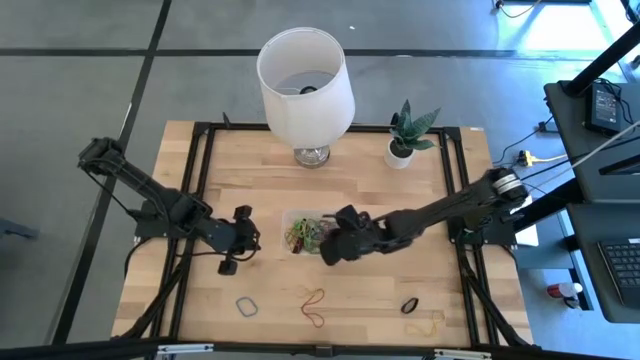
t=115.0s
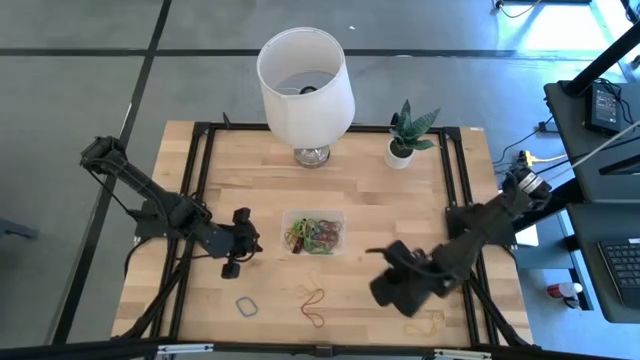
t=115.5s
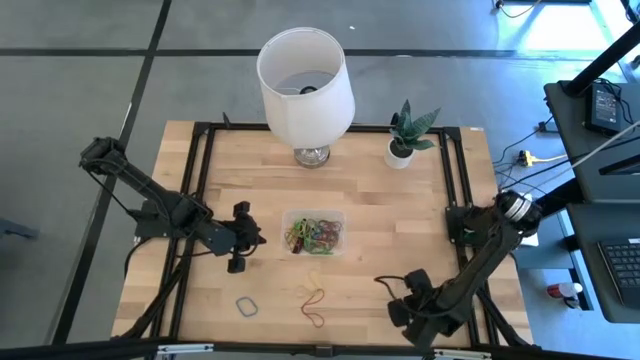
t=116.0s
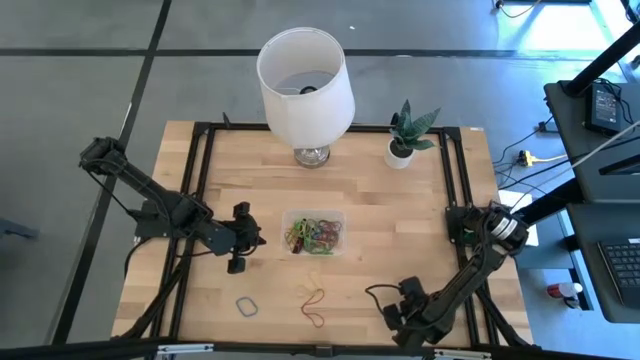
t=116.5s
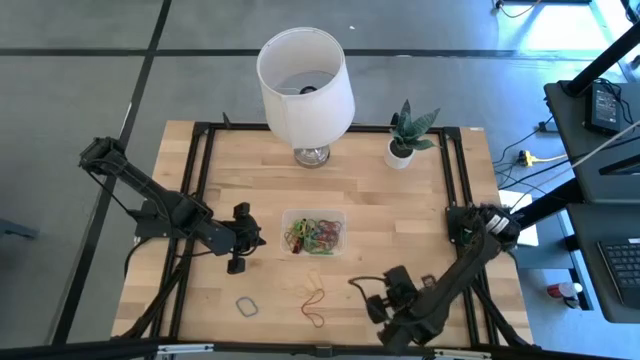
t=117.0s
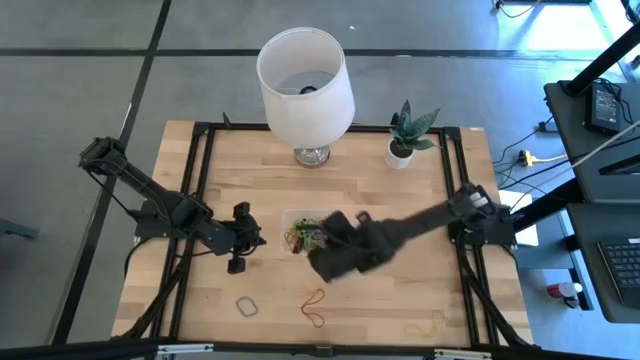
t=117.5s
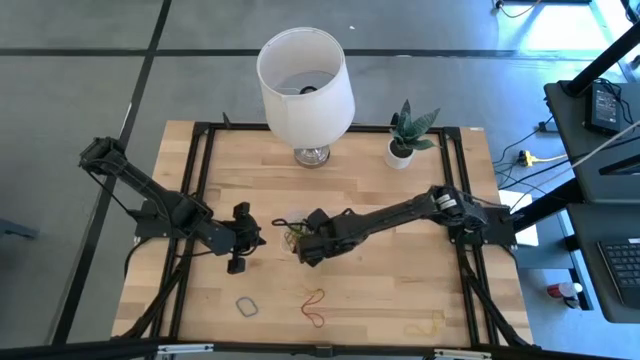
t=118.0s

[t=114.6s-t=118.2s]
Task: Pick and place rubber bands into bin
Put the black rubber band into the transparent bin

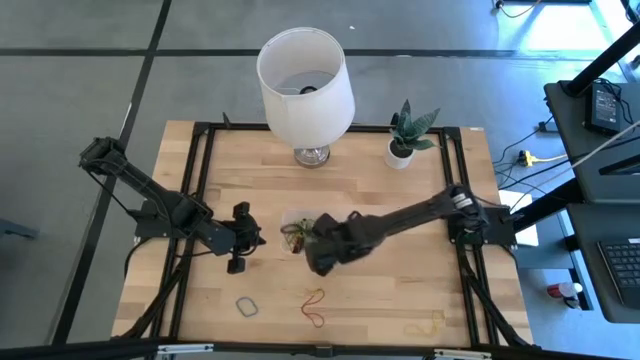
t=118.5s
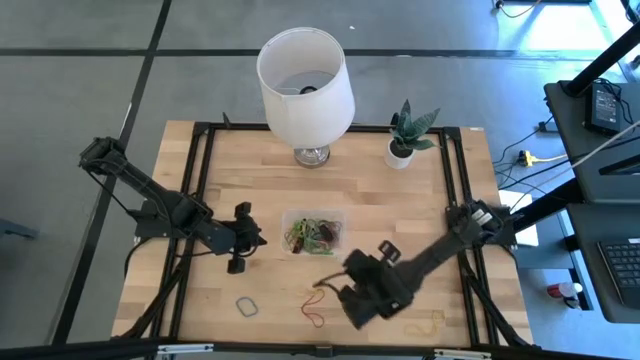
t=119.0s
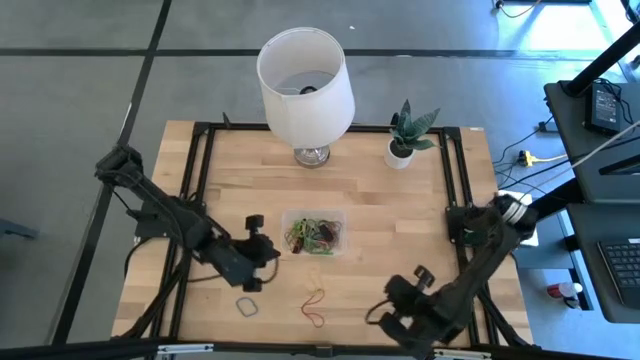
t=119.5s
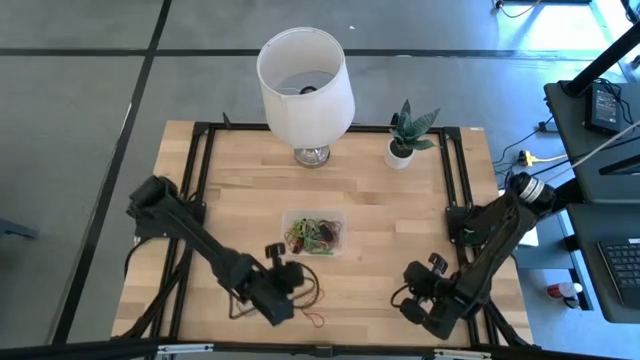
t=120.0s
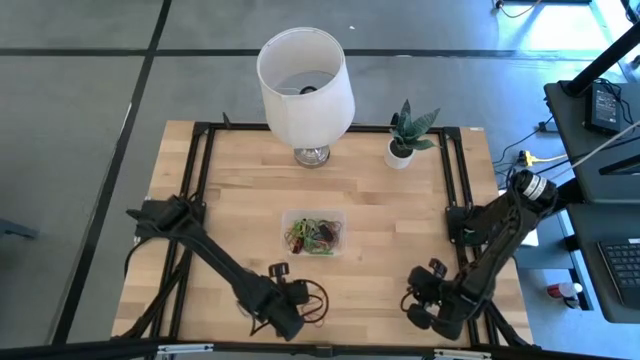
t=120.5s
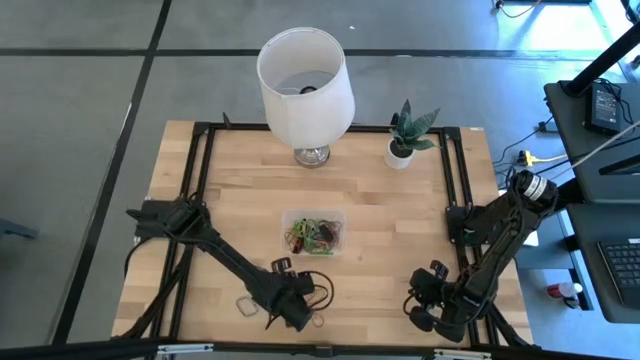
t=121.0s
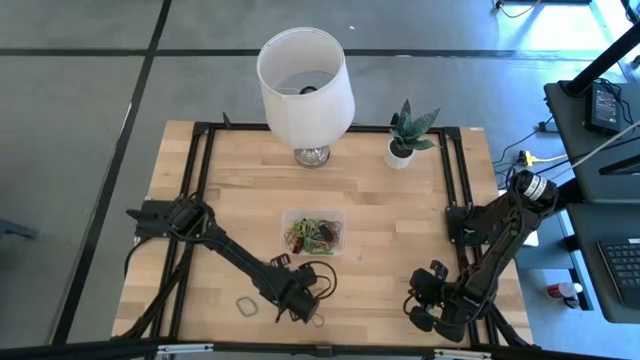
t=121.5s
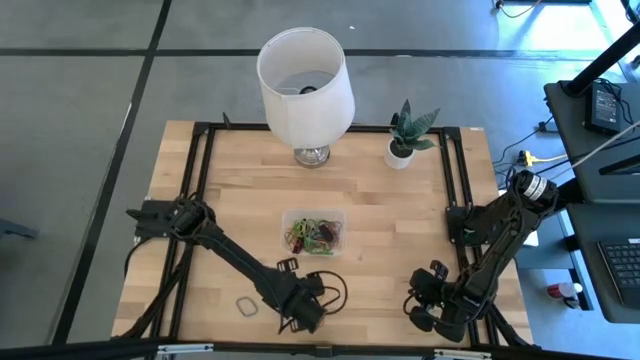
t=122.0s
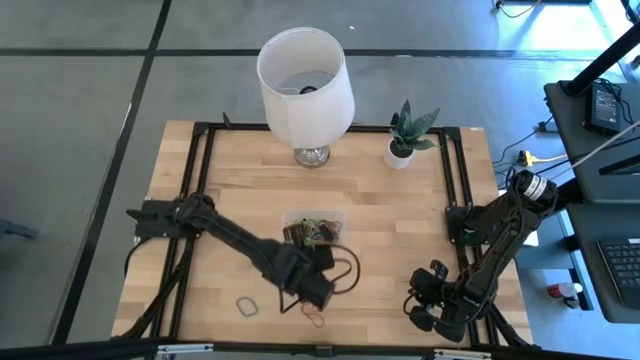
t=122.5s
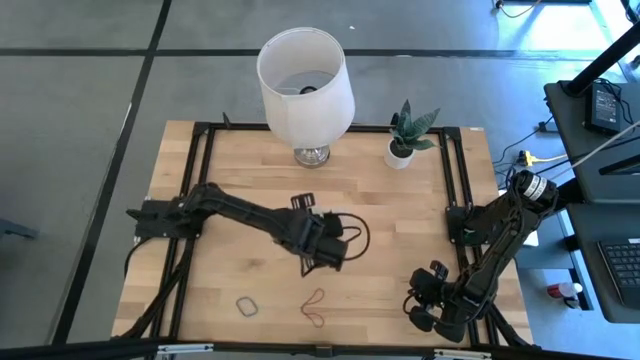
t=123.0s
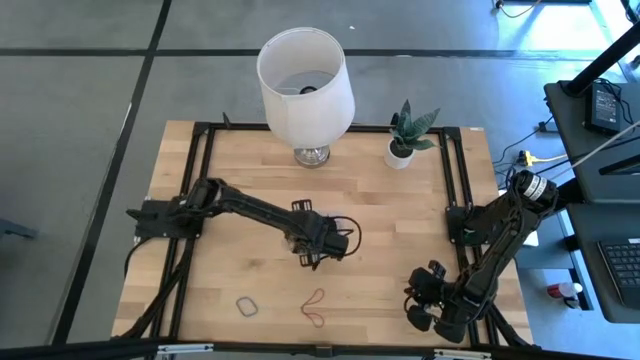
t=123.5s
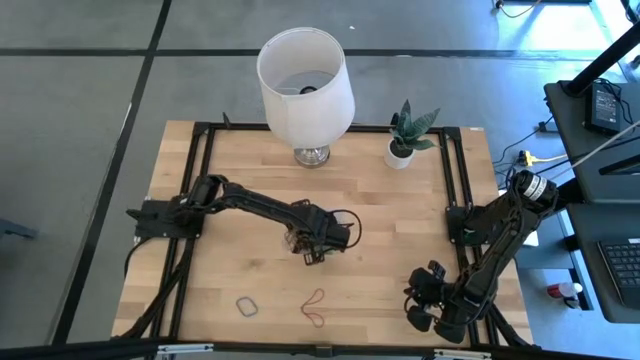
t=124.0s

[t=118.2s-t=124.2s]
Put the left yellow rubber band into the transparent bin

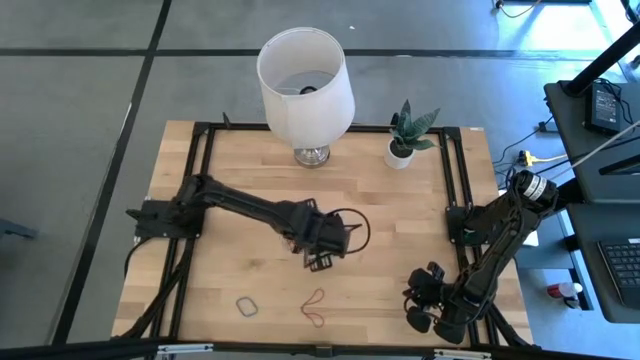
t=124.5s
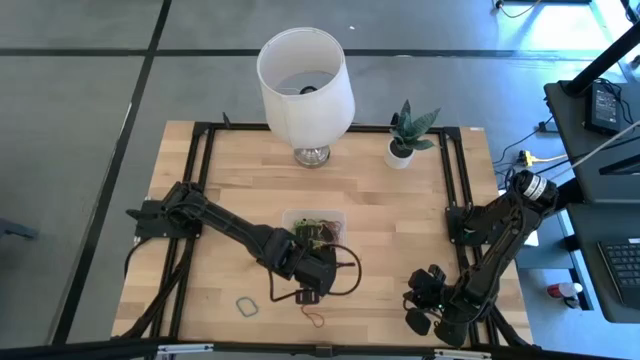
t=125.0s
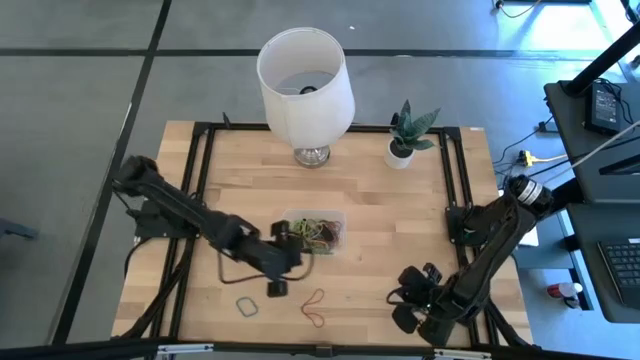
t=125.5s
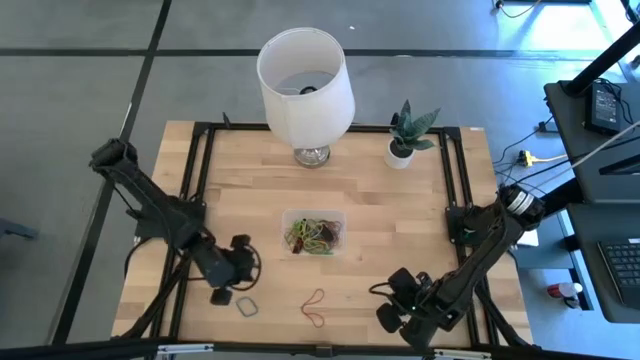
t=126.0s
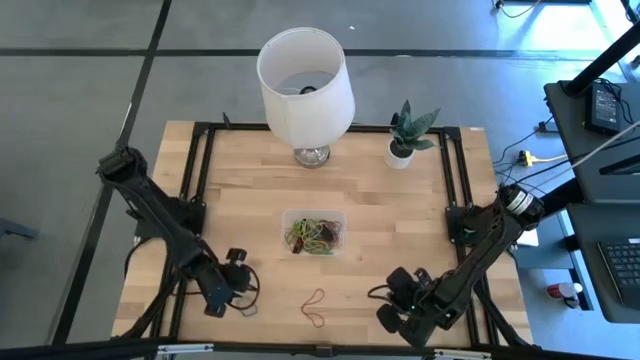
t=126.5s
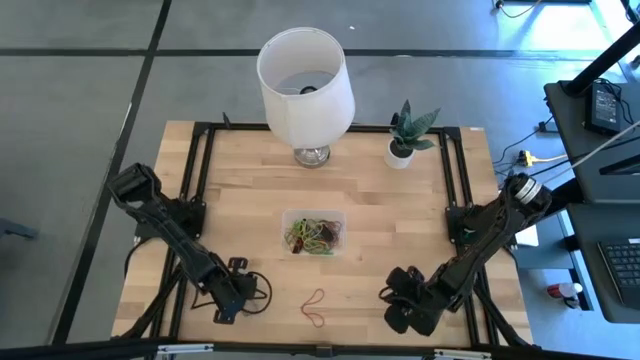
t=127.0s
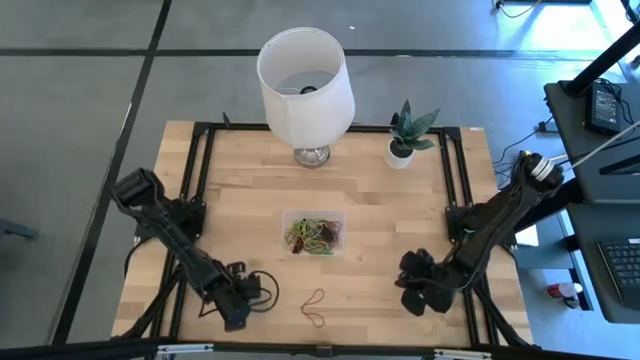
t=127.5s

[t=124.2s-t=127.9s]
Put the blue rubber band into the transparent bin

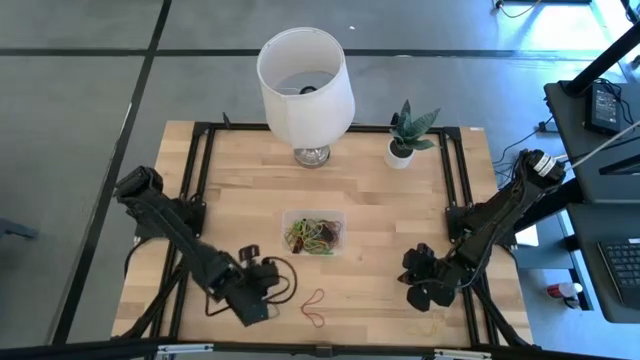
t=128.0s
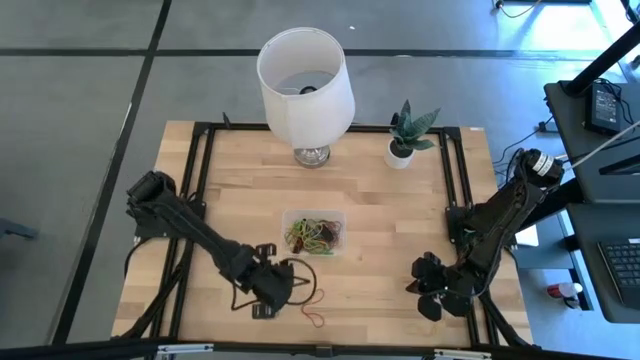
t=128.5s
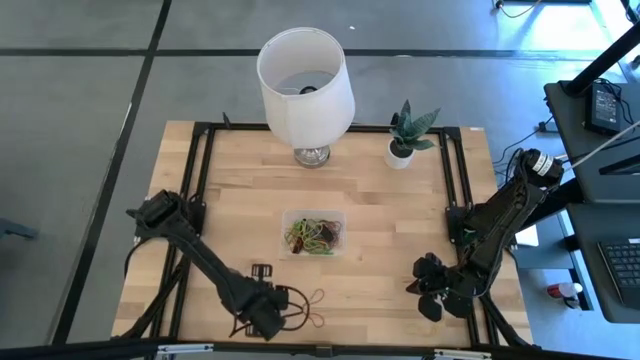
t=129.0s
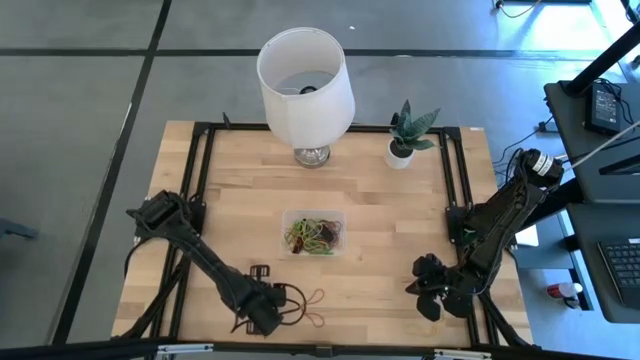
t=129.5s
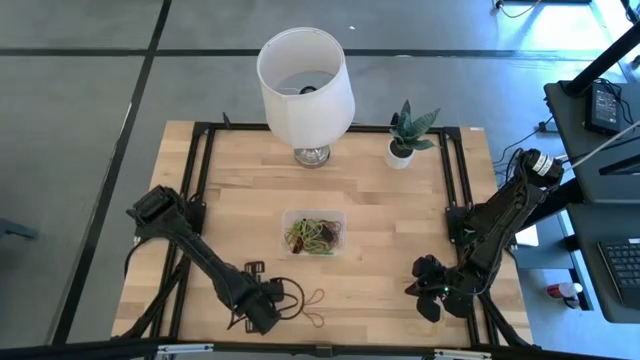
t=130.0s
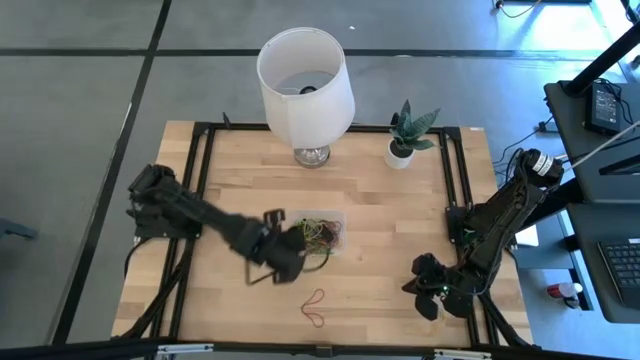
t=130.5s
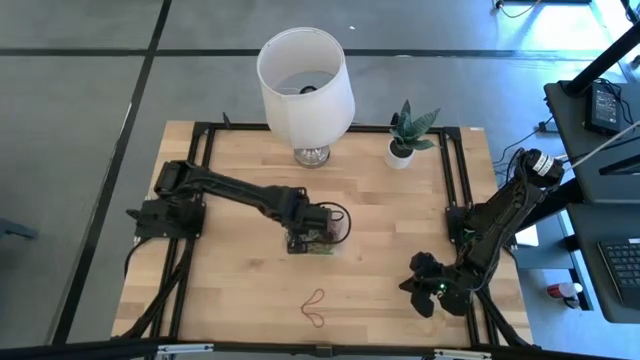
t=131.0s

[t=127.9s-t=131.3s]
Put the blue rubber band into the transparent bin

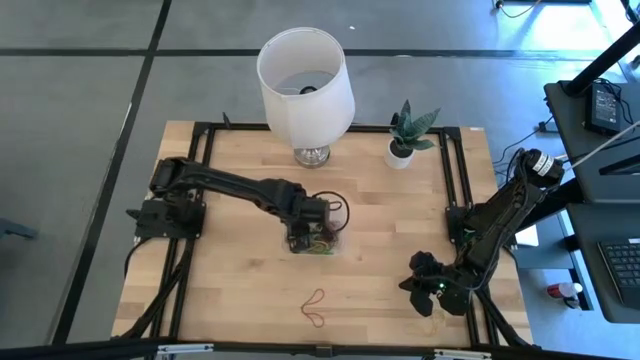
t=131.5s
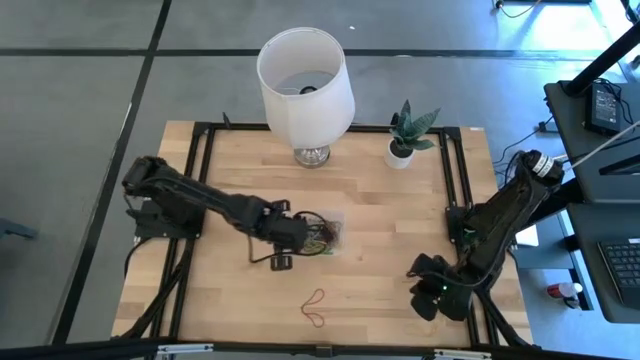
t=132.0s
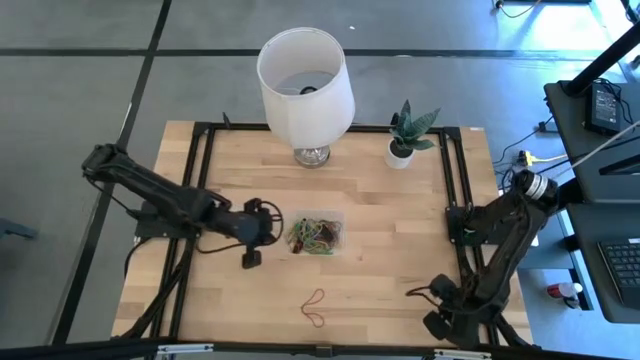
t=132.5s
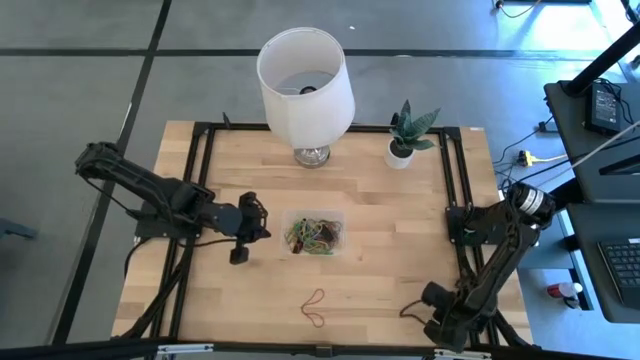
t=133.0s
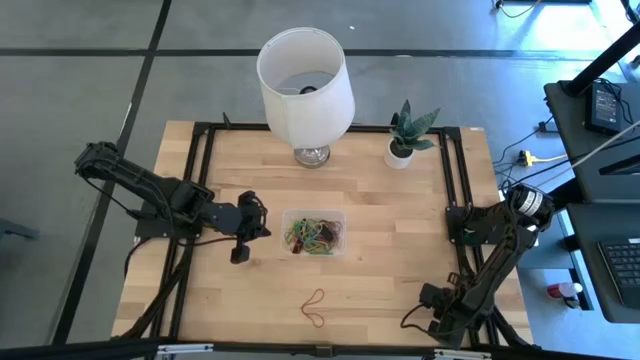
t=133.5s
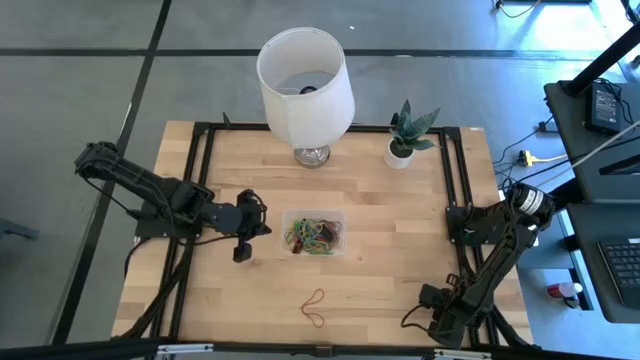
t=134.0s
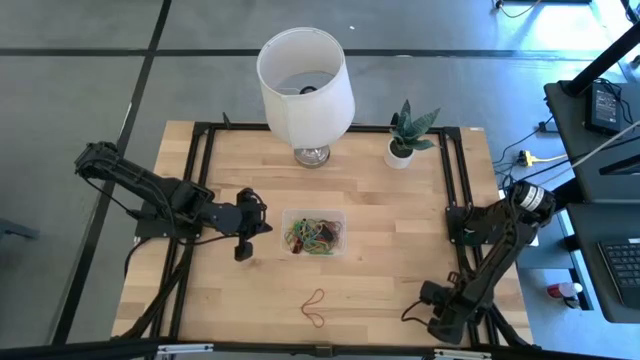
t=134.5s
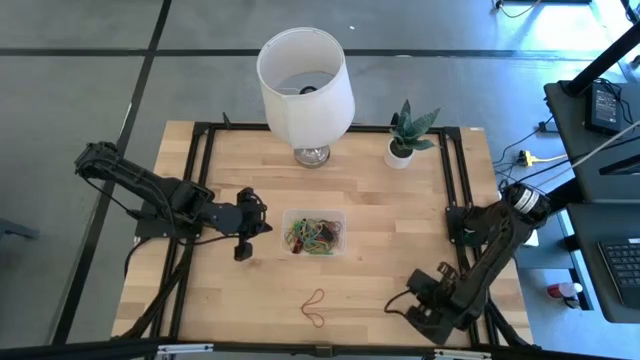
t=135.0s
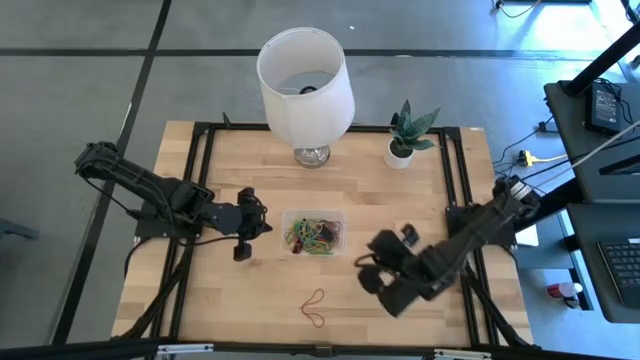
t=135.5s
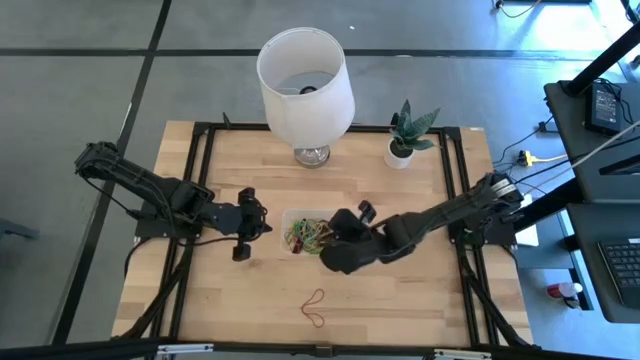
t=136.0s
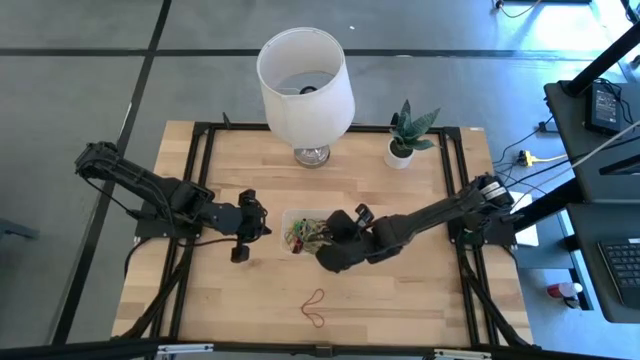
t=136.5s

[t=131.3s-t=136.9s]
Put the yellow rubber band into the transparent bin
